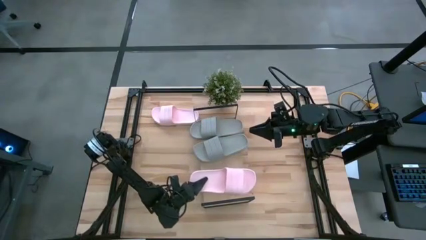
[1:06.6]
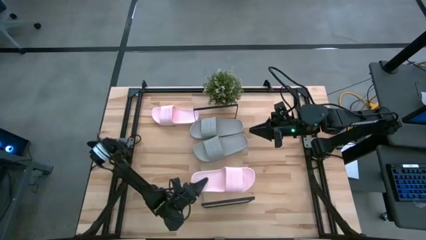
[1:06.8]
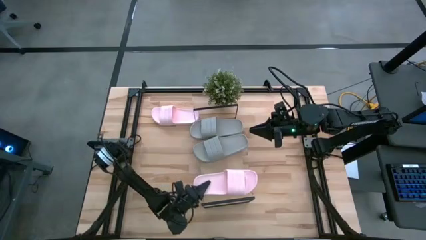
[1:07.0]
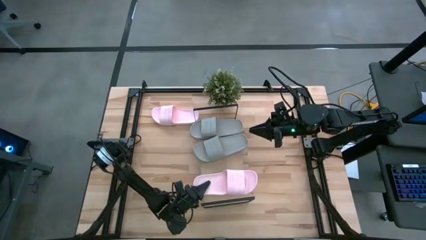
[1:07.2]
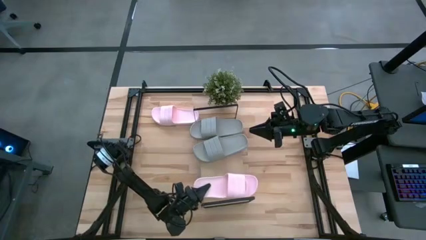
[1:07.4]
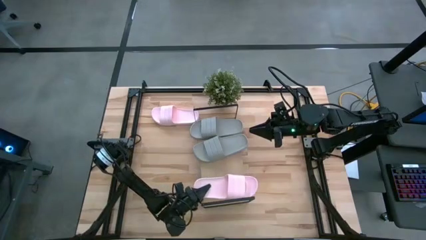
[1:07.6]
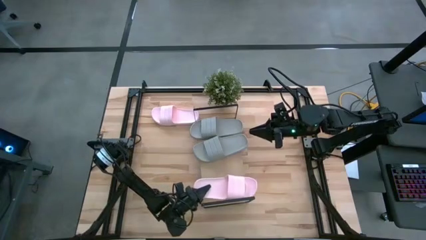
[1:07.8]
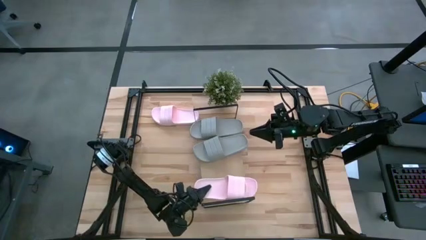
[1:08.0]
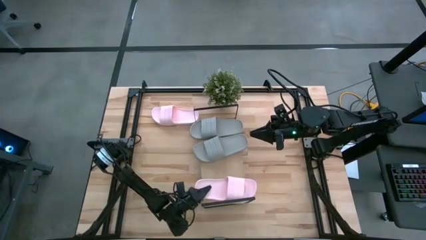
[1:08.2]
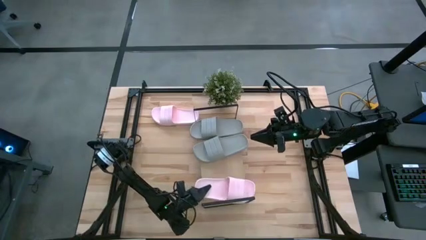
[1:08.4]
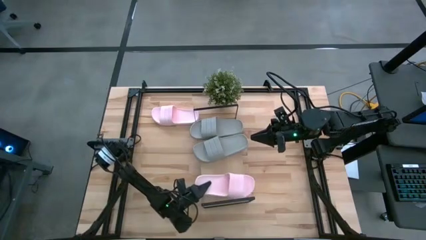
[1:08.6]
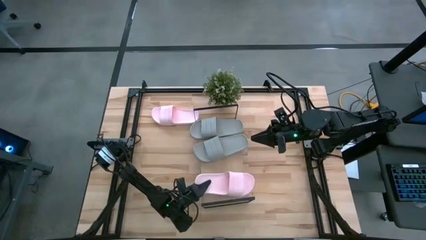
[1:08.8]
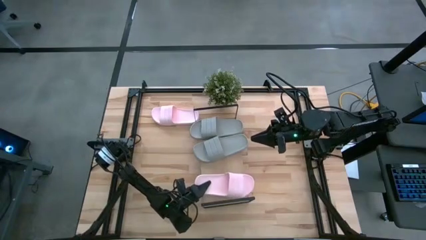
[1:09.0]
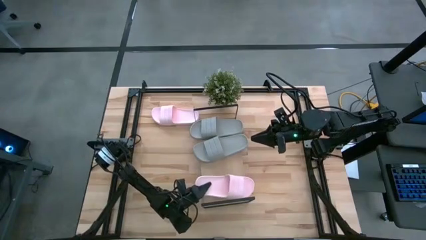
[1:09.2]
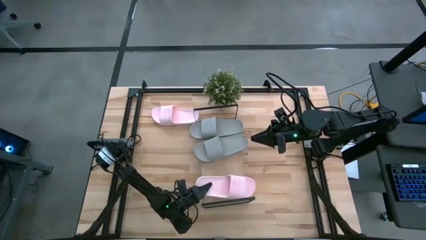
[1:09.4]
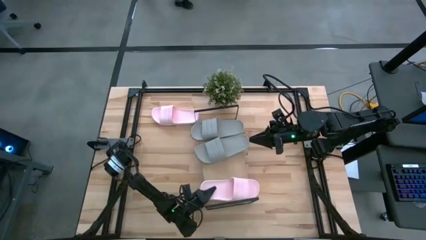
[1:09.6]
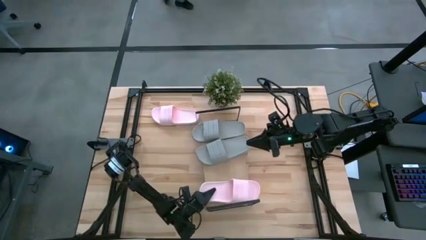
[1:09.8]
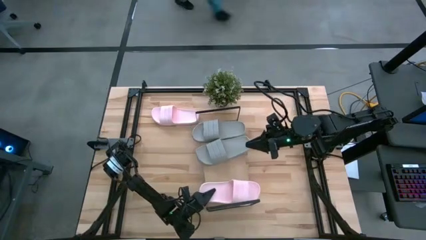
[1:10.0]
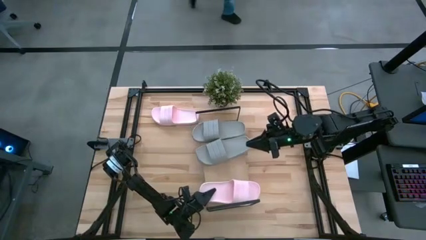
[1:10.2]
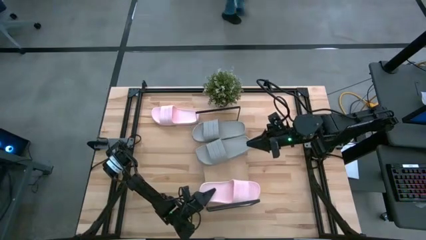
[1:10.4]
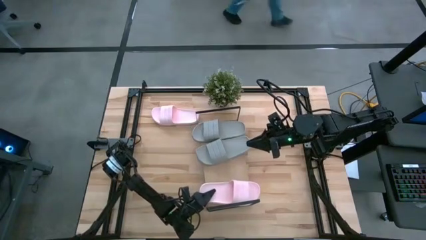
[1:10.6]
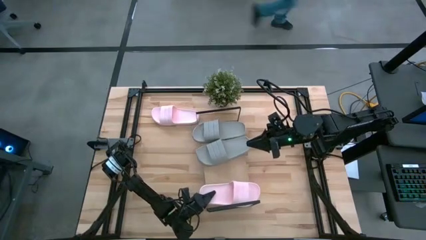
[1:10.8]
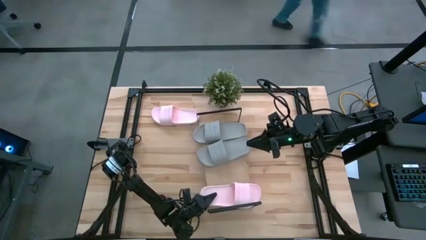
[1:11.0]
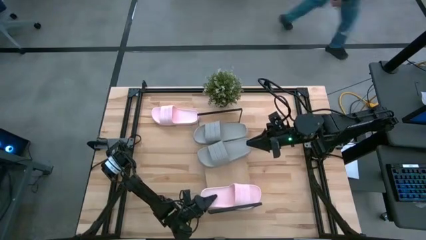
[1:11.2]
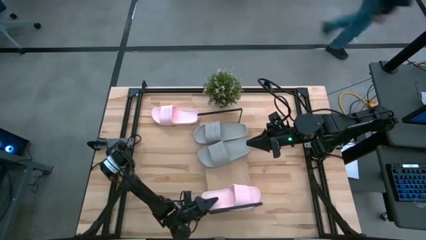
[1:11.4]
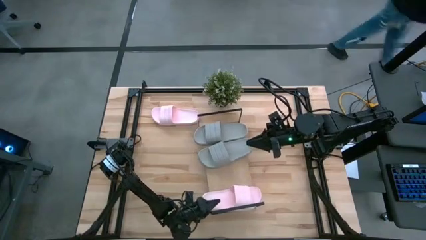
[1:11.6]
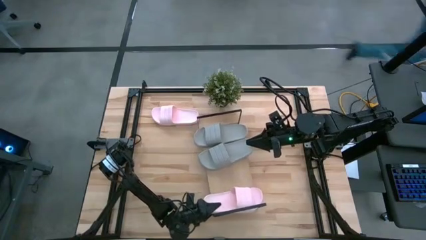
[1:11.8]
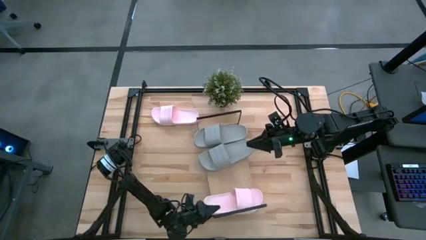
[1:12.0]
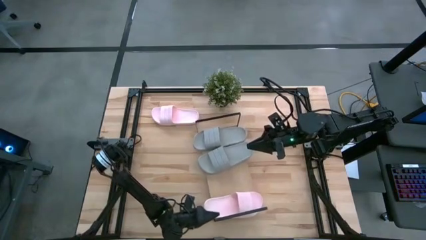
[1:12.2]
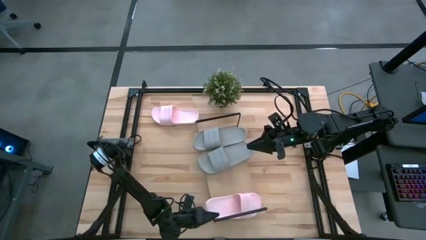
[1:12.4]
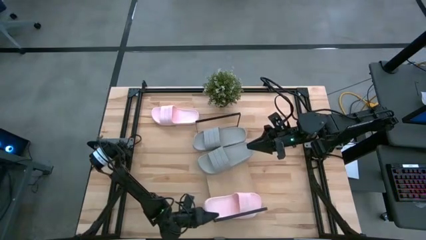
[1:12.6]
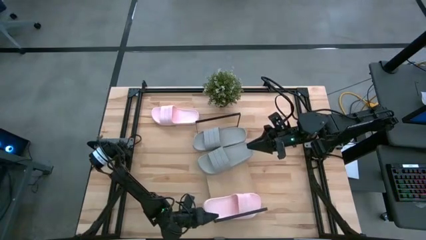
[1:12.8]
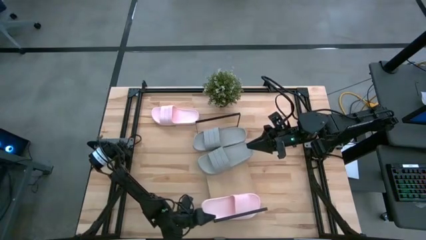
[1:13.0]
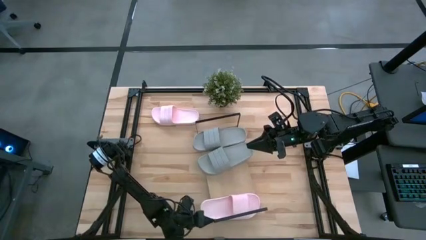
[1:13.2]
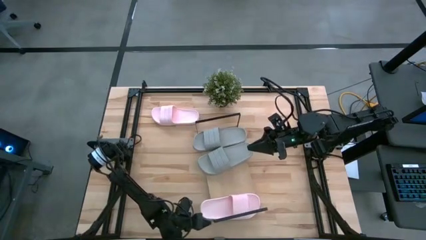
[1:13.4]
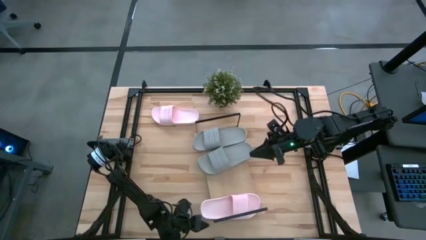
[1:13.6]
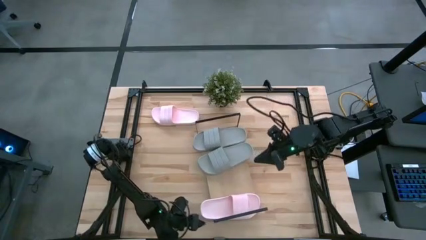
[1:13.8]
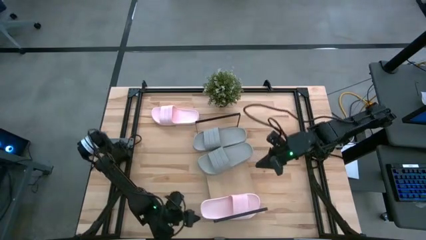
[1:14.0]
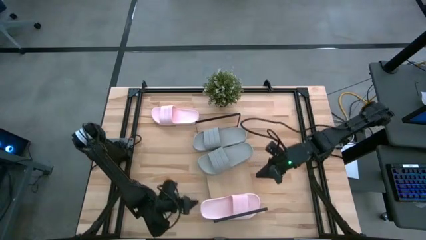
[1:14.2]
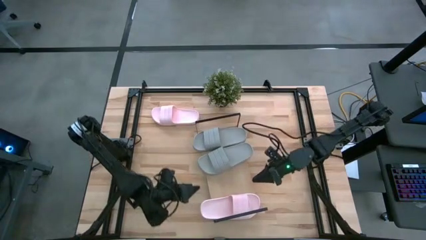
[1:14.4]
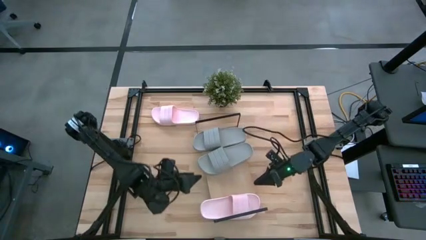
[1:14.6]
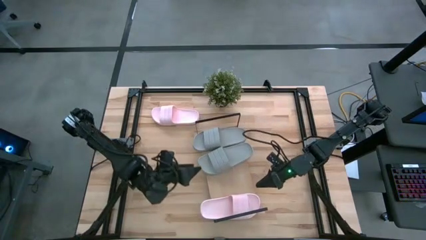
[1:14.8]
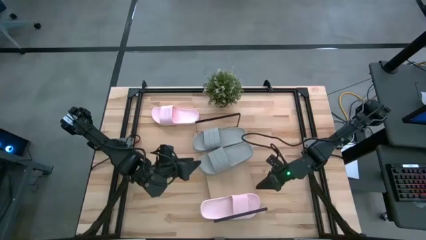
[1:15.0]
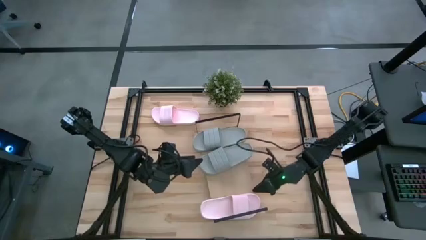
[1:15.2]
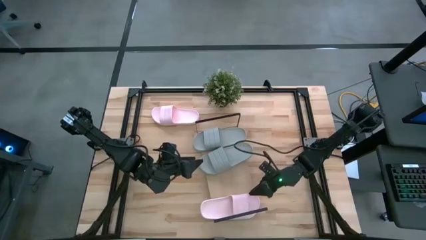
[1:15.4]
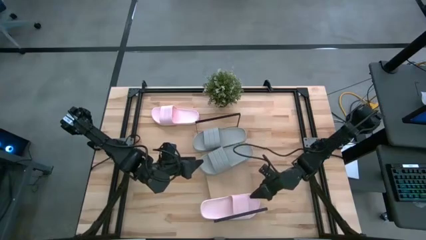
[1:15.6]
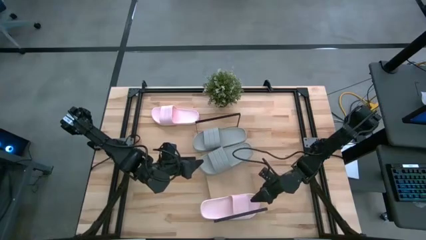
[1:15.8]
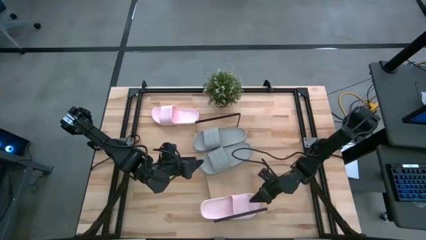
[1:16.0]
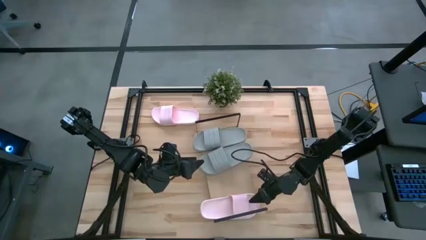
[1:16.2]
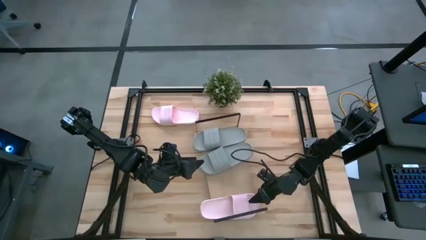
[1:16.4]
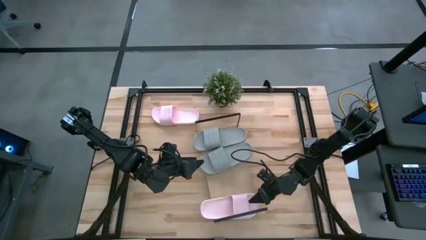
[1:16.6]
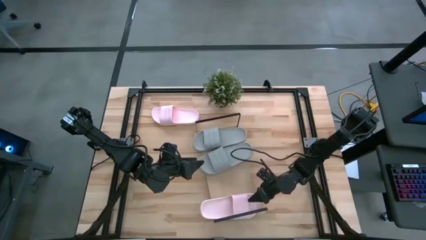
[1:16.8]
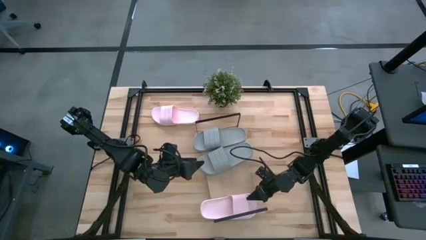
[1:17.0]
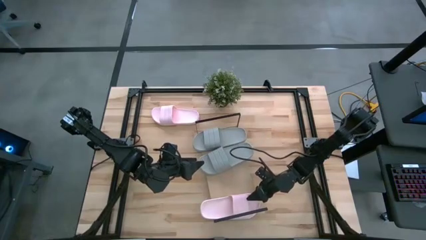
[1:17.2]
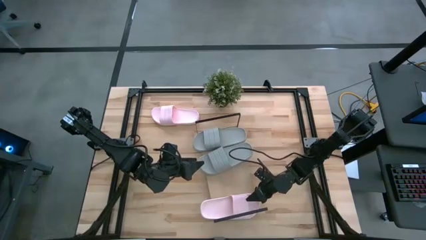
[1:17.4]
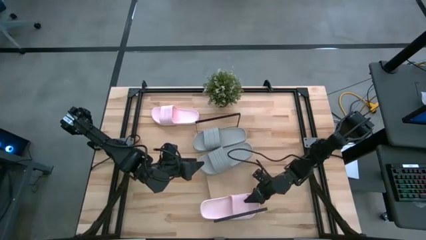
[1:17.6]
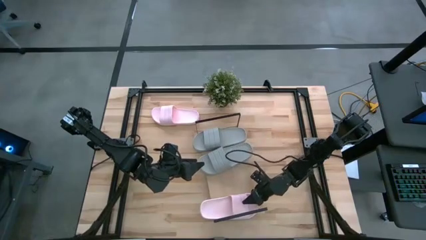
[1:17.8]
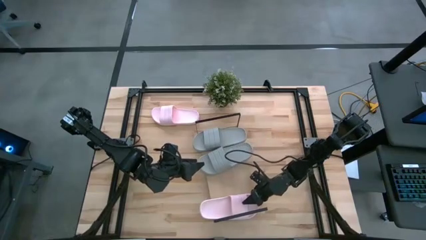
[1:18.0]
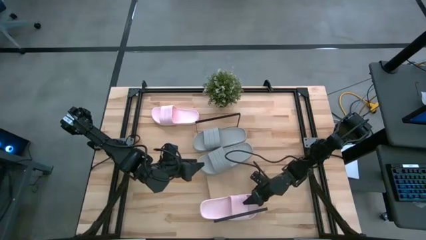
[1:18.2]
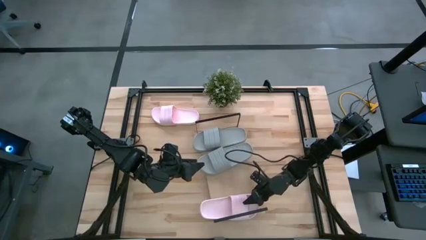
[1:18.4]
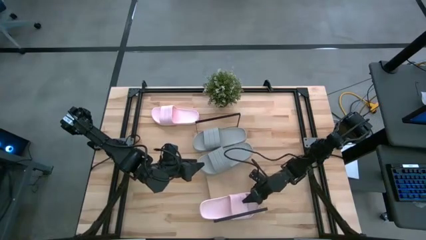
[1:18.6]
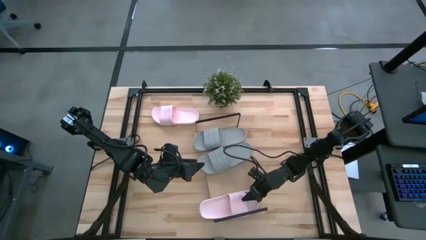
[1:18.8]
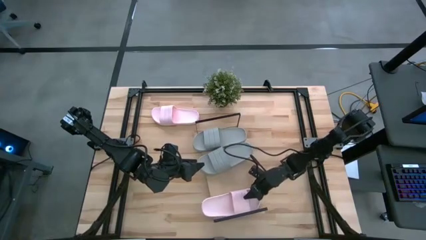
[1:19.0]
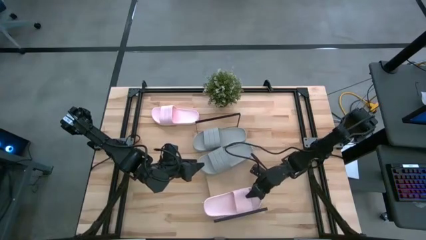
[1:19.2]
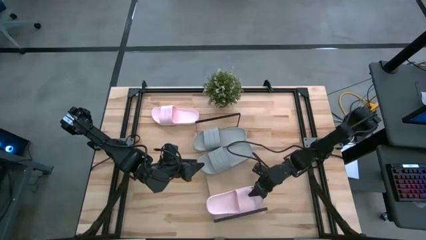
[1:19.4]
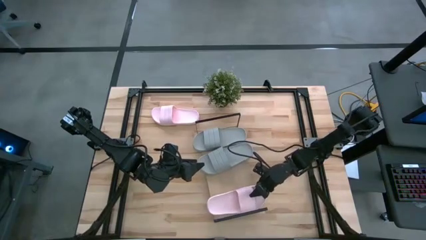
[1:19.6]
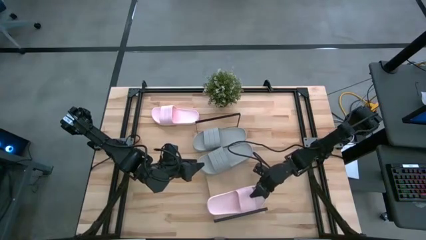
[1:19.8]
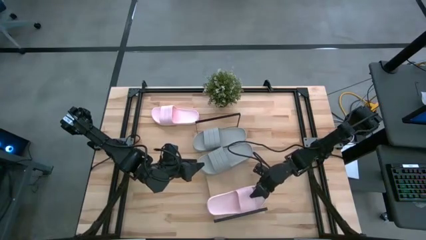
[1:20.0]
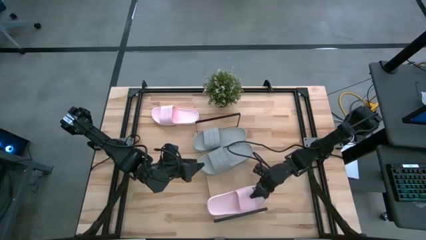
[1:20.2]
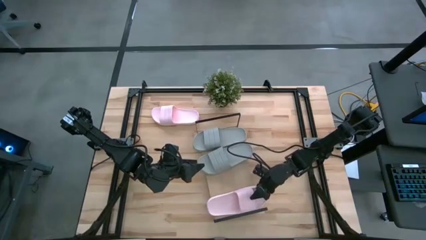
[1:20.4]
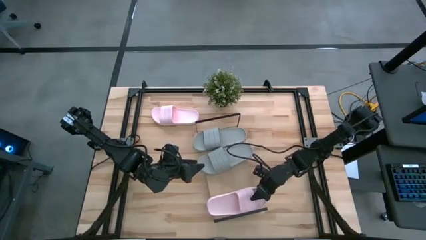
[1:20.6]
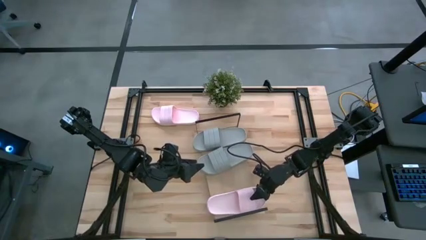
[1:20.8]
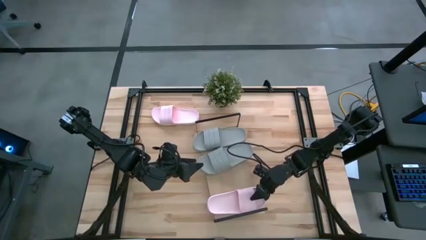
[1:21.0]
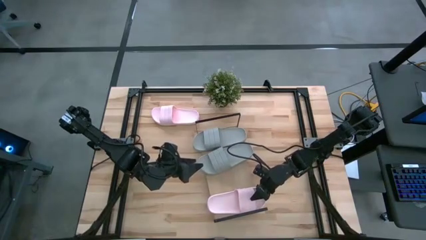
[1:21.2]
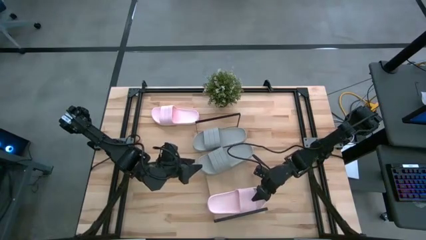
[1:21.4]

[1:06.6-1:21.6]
Task: Pick and place slides into the shelf
Put the bottom pink slide on the shelf

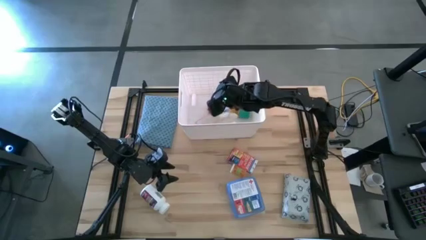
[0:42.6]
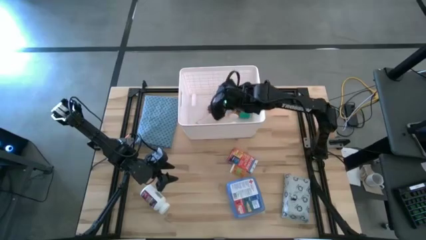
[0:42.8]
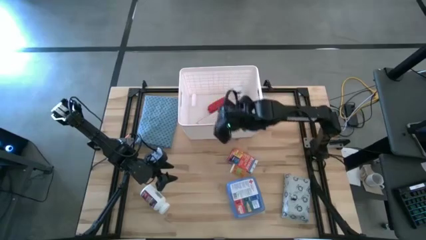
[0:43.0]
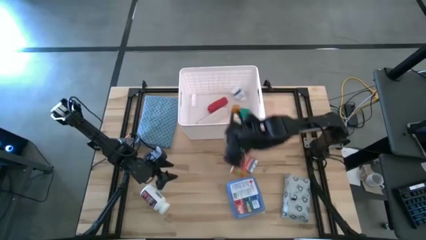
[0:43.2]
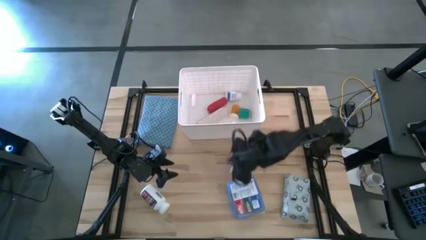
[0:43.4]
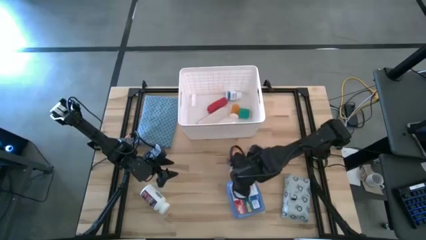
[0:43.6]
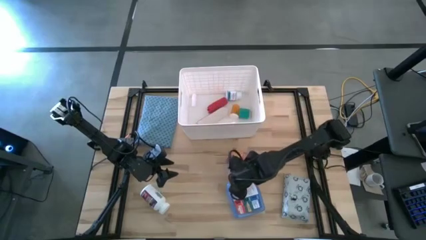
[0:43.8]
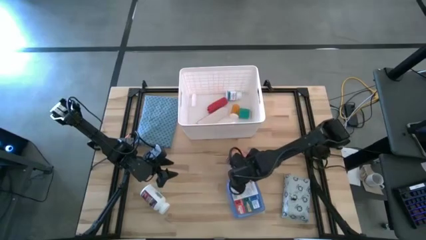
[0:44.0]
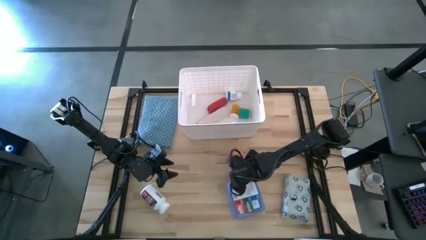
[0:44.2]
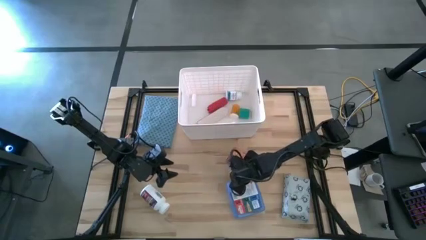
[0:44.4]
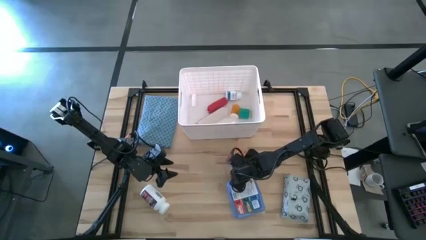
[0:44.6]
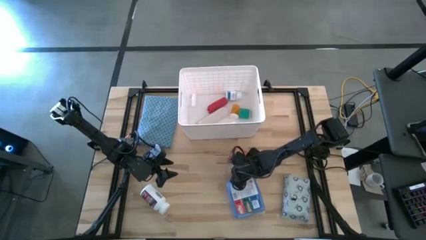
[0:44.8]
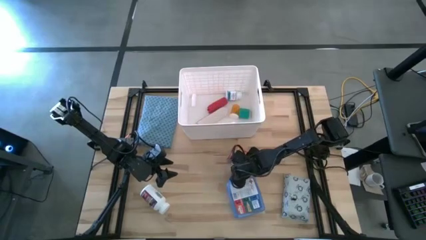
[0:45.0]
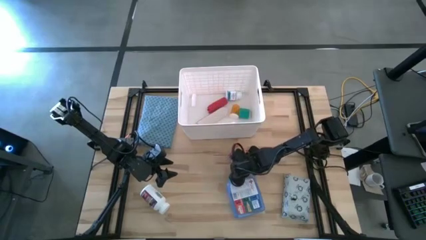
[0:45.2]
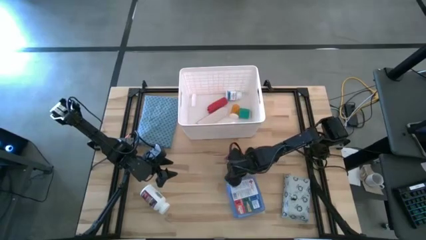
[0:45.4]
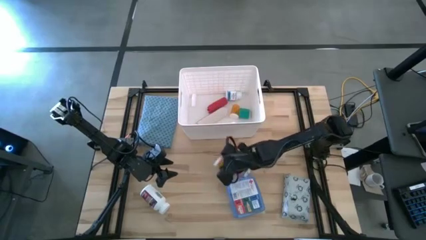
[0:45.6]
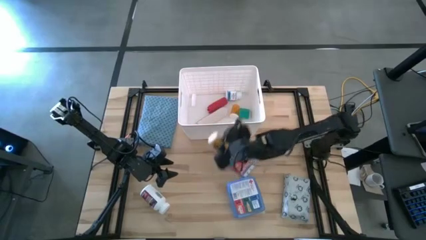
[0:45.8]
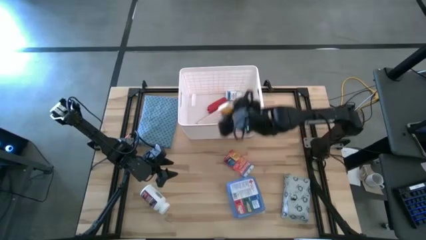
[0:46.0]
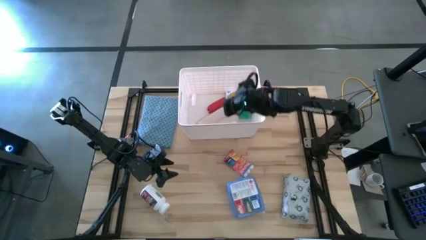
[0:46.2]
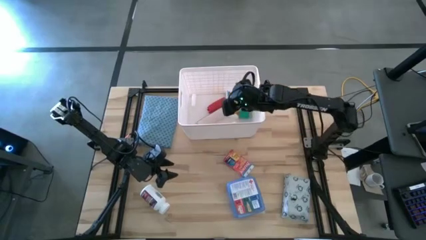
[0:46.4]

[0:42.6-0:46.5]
Task: Pick & place medical supplies in basket/bin
Put the orange pill bottle into the white bin
